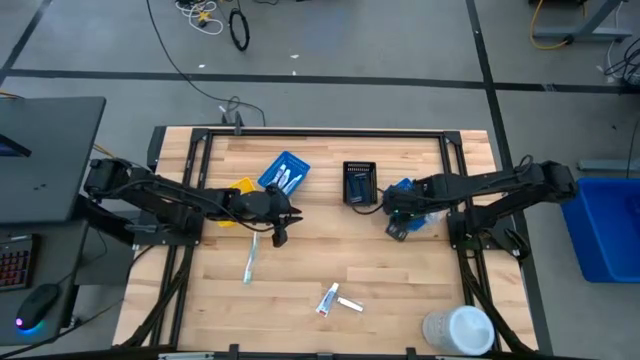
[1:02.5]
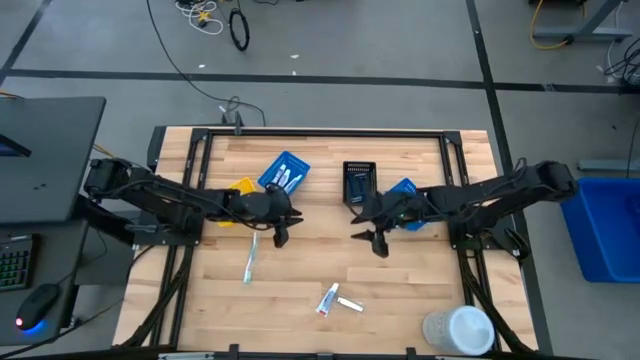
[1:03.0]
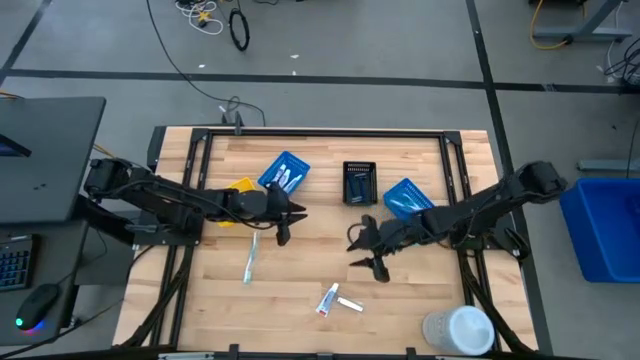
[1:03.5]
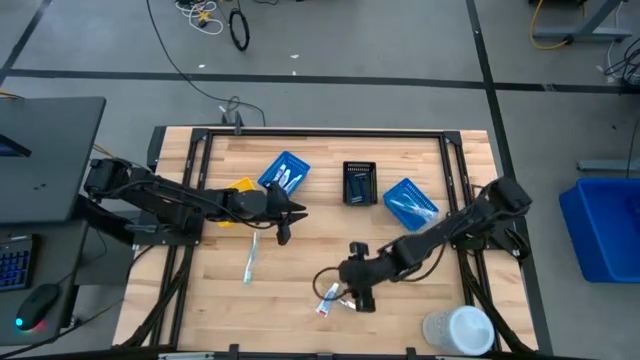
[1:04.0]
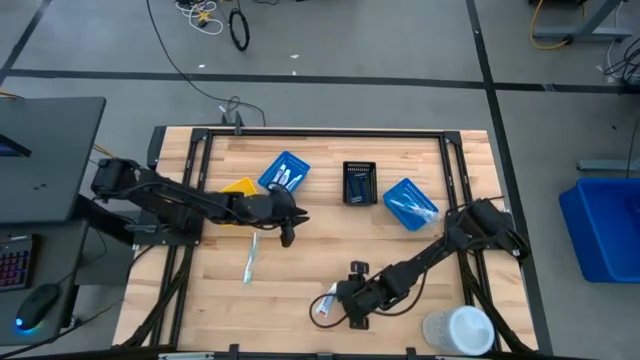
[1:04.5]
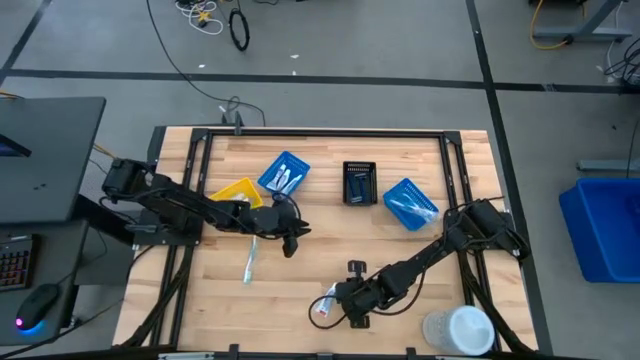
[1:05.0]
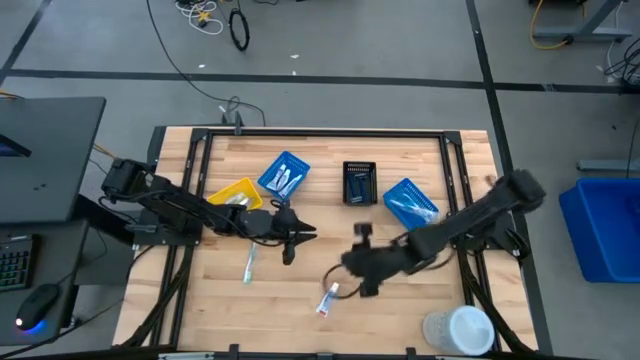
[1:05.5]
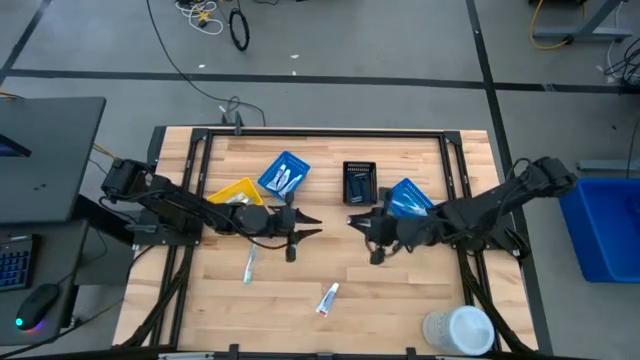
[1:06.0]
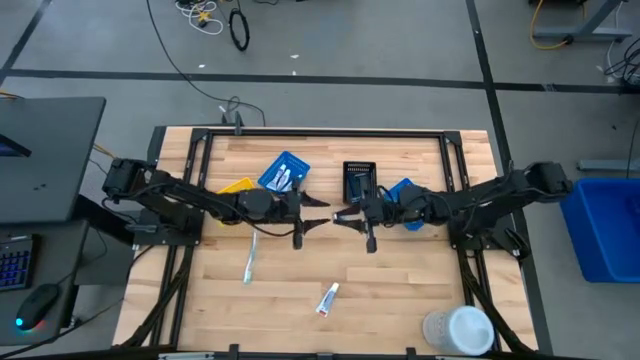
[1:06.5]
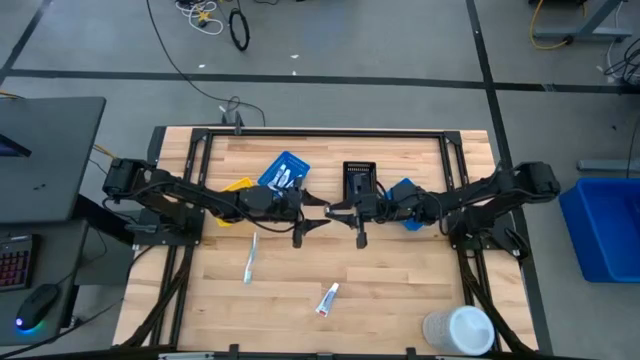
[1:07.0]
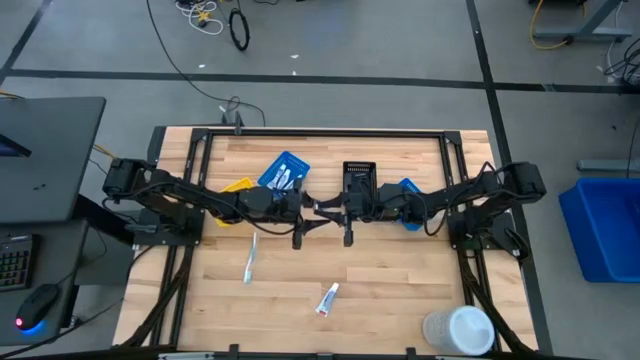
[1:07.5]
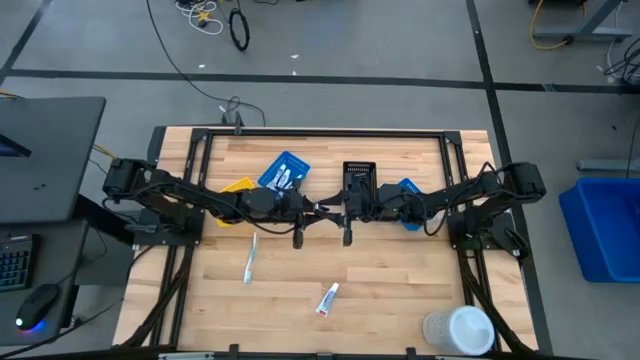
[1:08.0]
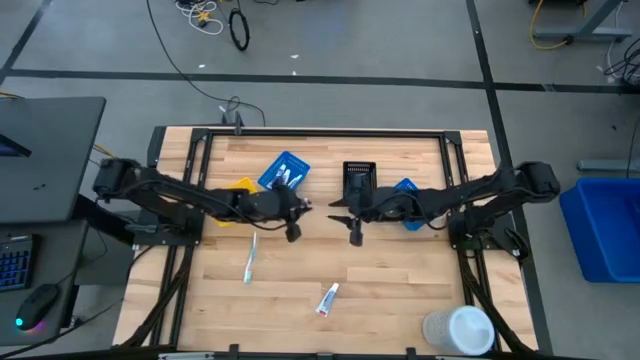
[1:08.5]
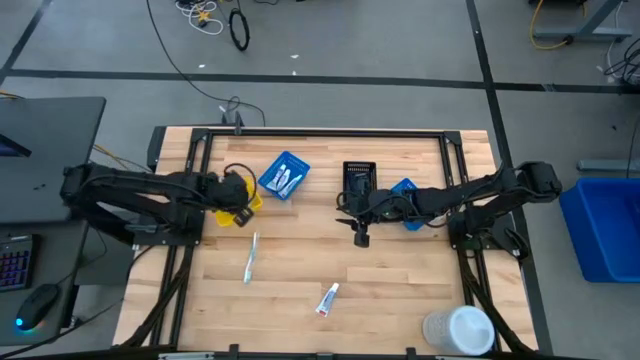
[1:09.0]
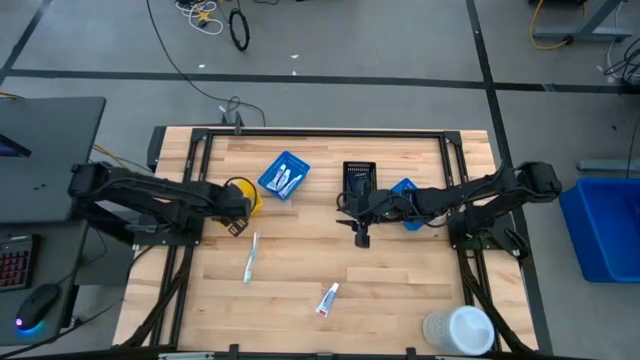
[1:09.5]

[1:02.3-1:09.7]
Task: Pick & Place Travel size toiletries
Put the silver nail cutter into the yellow bin

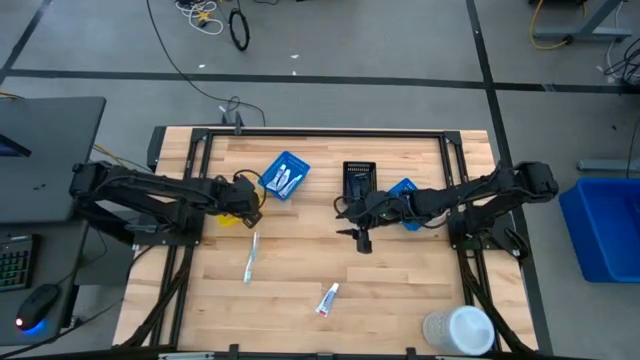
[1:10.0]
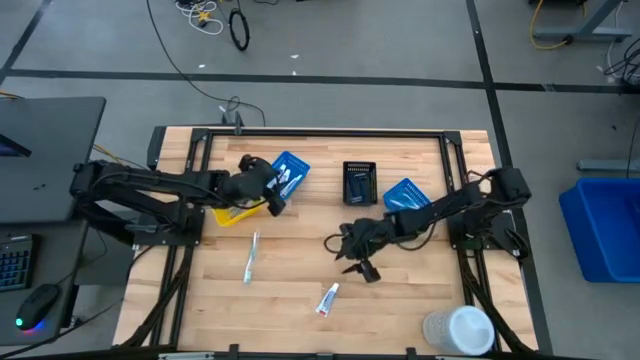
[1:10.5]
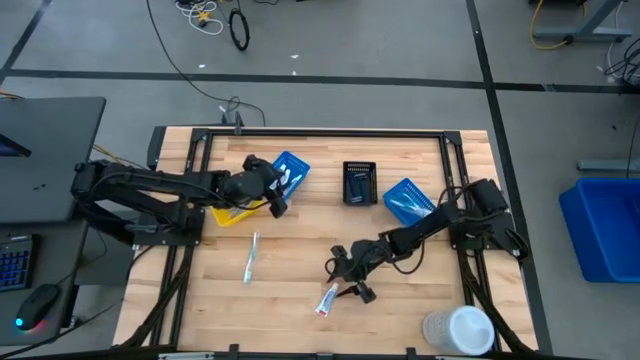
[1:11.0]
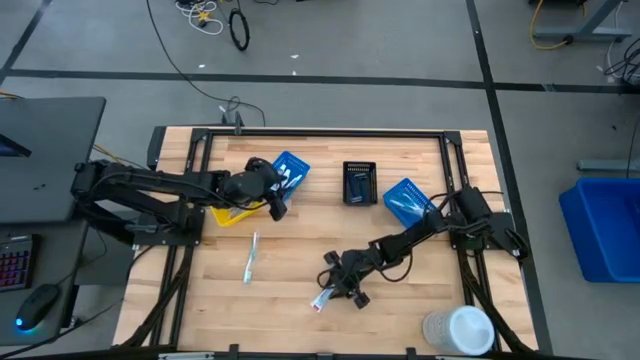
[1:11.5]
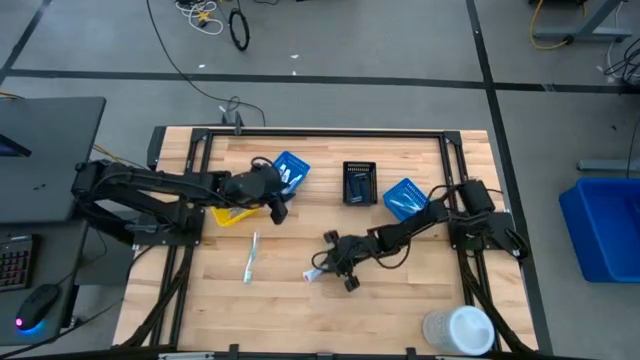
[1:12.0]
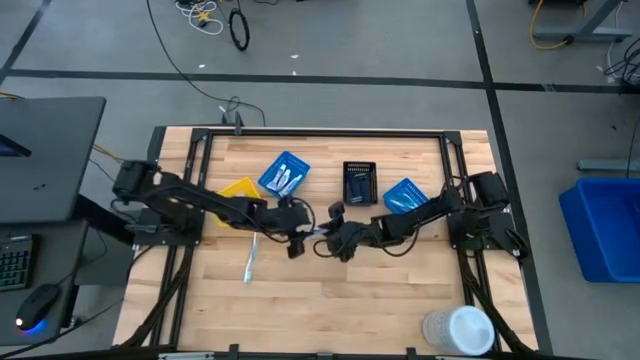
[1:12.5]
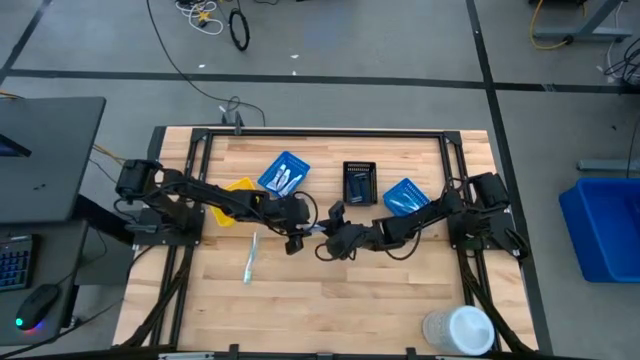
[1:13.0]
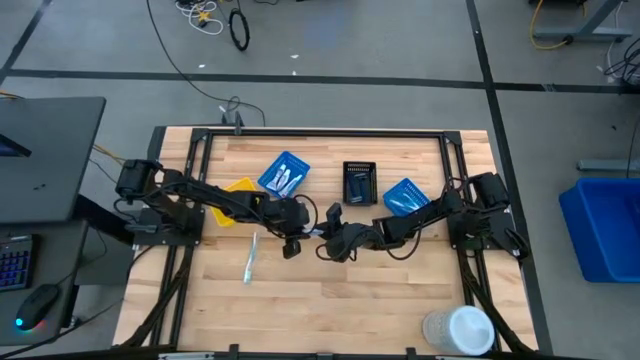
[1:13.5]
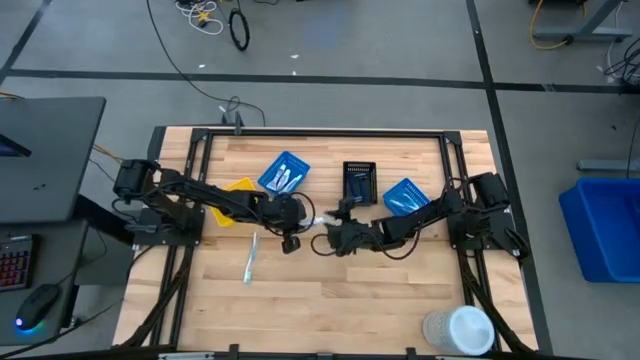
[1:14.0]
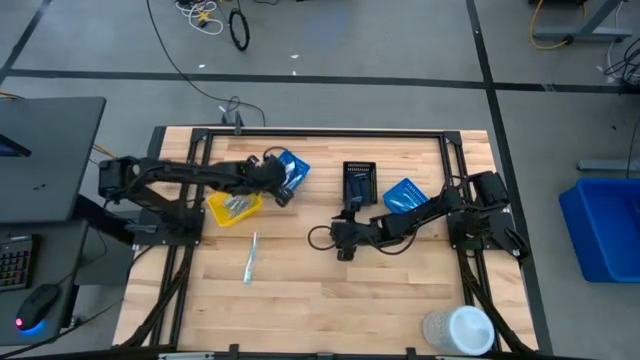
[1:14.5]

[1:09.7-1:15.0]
Put the violet toothpaste into the left blue bin

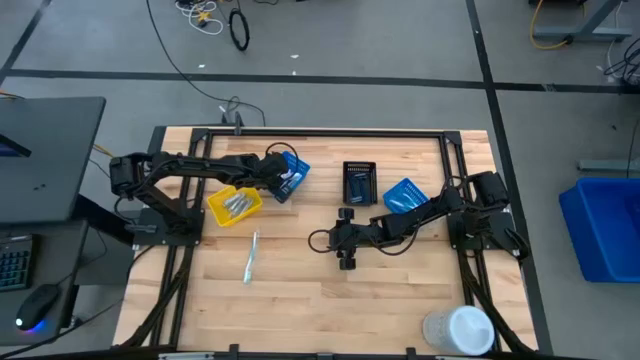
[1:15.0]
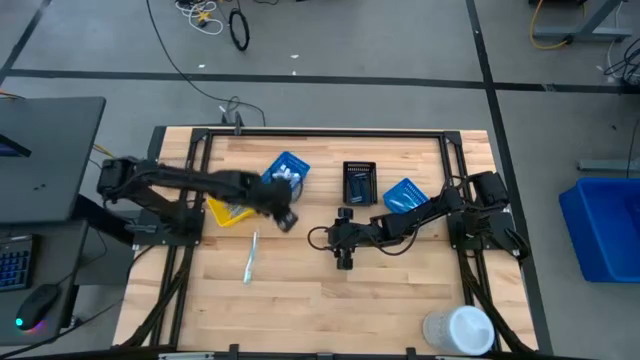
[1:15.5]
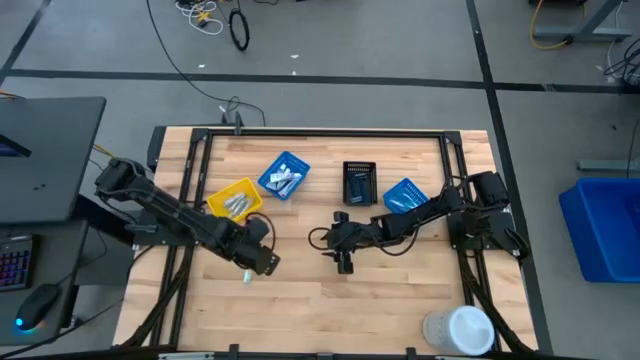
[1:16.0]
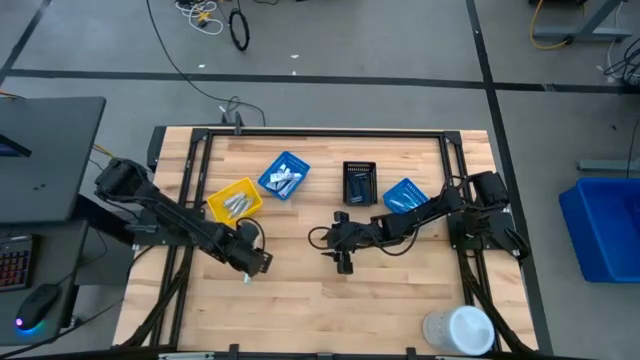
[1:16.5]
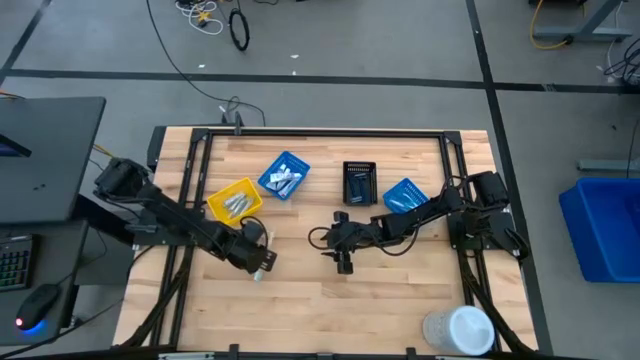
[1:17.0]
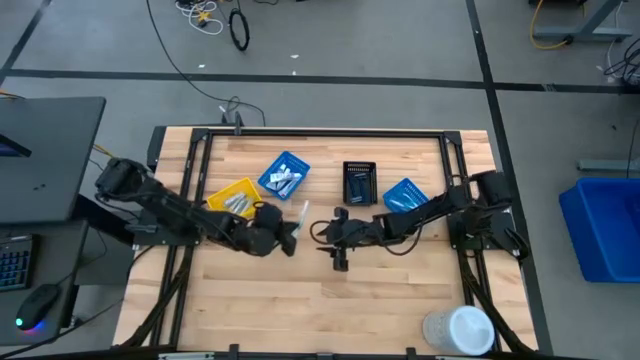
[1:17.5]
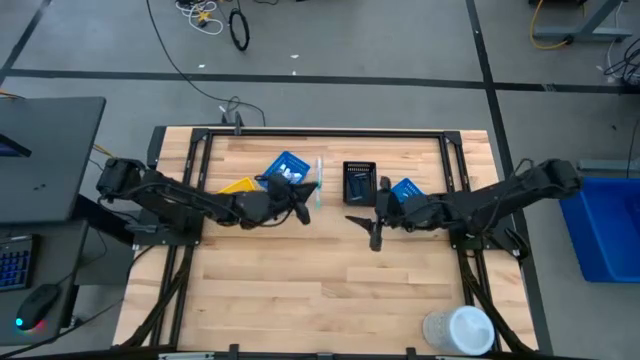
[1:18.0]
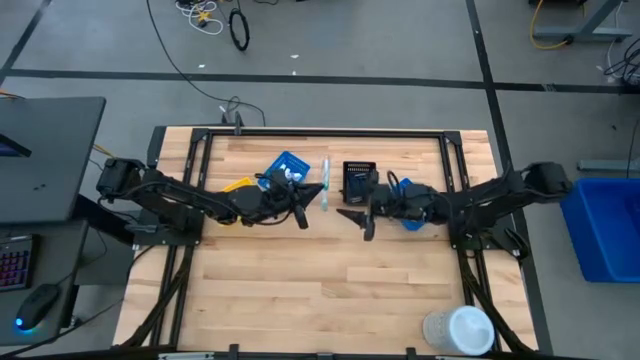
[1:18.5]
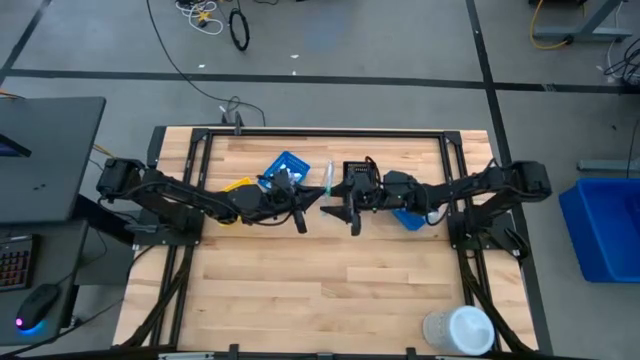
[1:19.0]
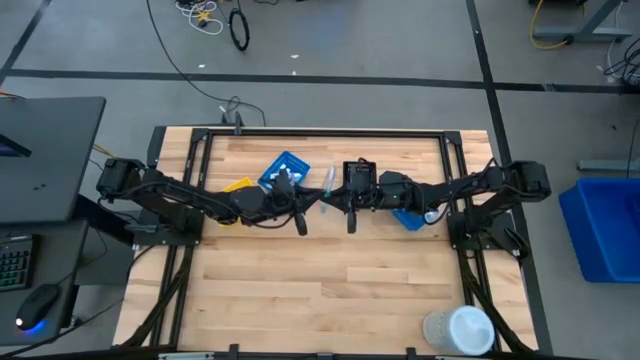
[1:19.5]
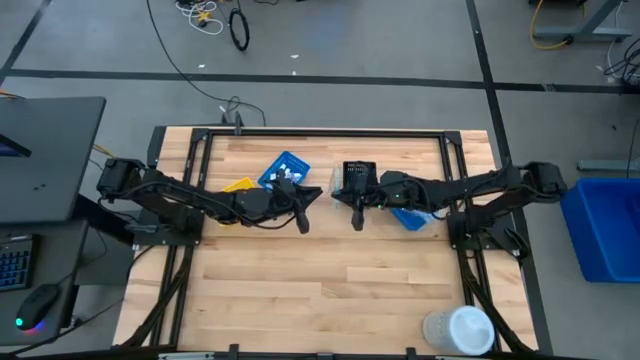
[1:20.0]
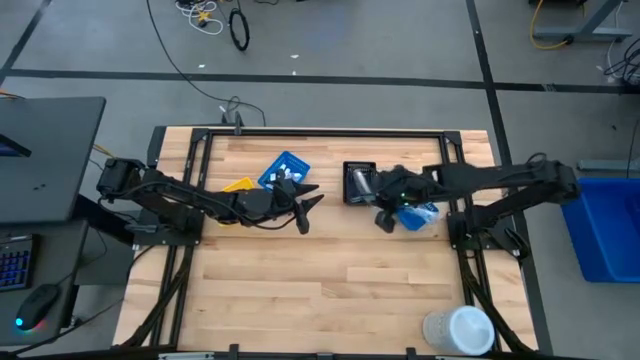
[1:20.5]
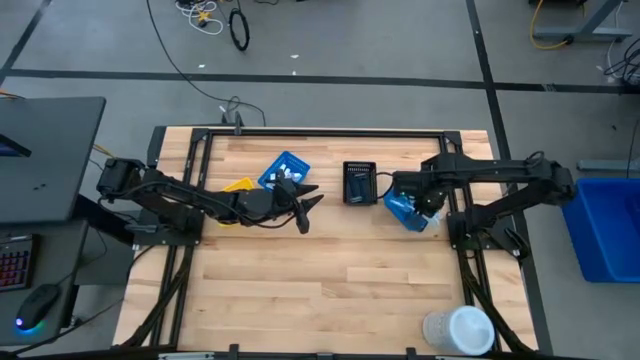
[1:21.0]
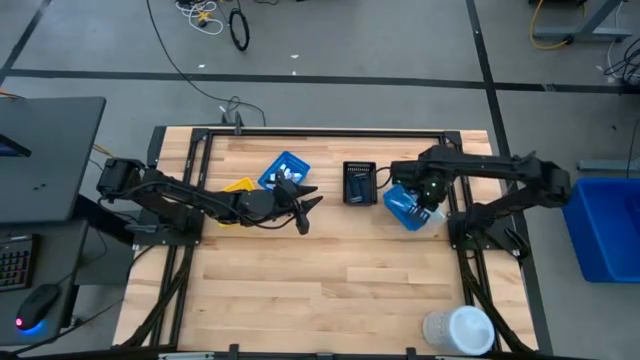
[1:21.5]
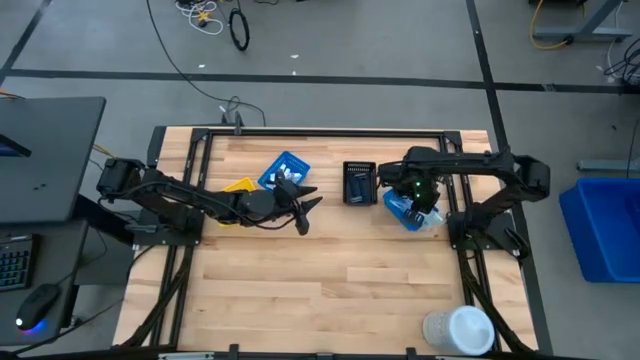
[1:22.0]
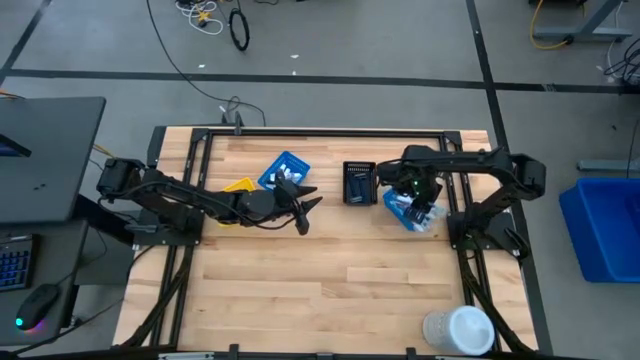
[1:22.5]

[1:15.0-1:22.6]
Put the green toothbrush into the right blue bin

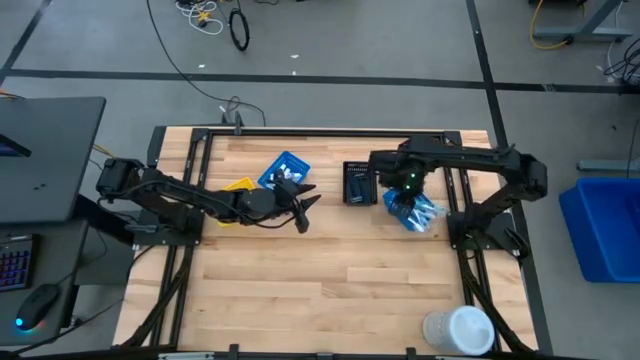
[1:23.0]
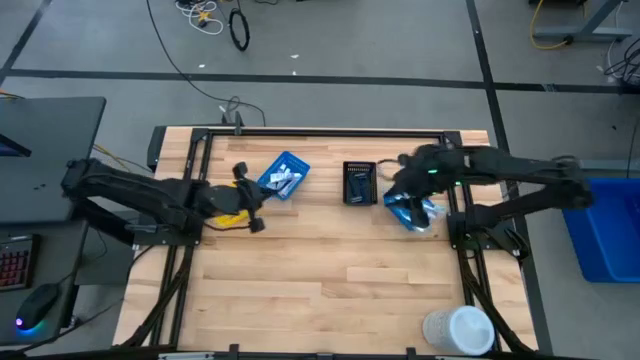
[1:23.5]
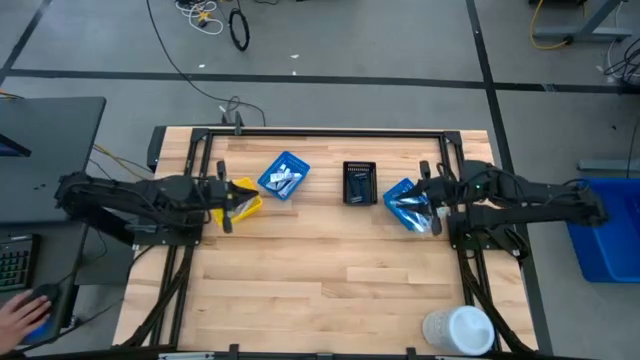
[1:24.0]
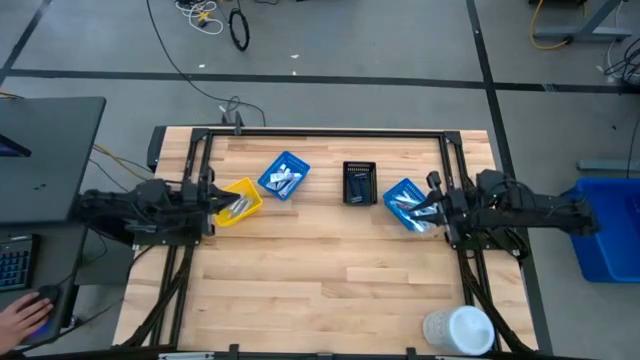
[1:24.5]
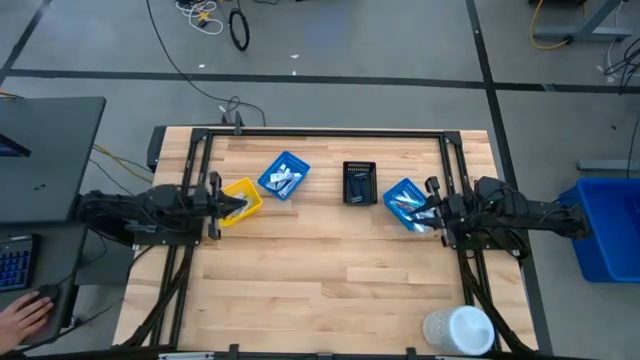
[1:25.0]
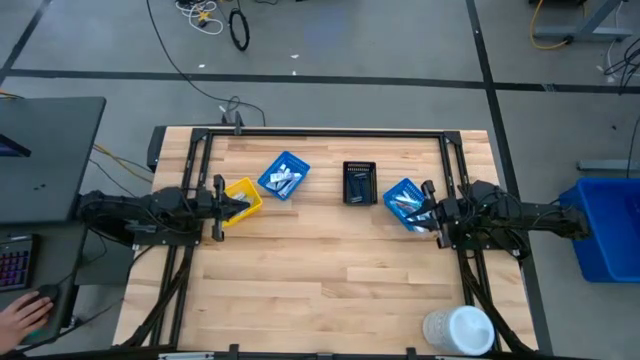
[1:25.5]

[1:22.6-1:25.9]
Return to Home Position
